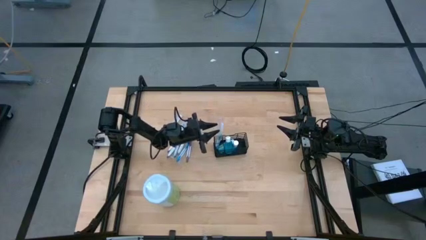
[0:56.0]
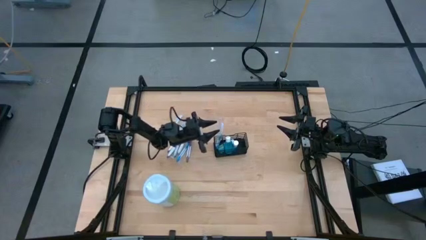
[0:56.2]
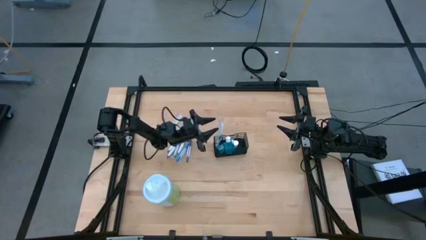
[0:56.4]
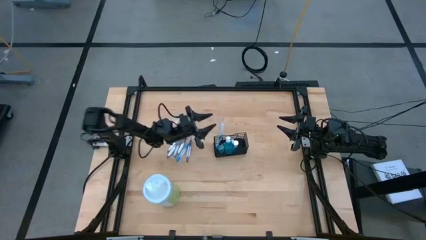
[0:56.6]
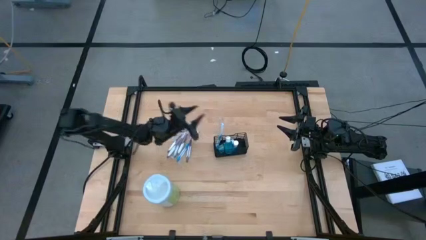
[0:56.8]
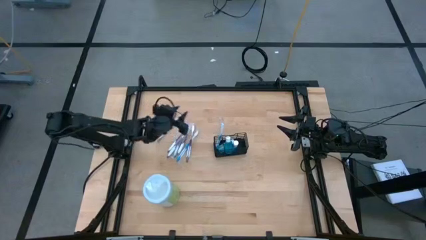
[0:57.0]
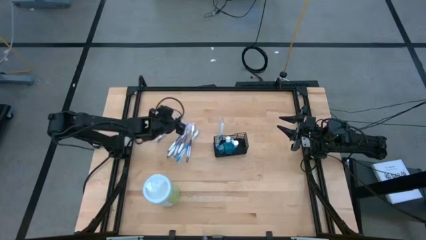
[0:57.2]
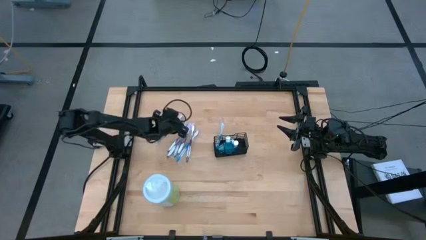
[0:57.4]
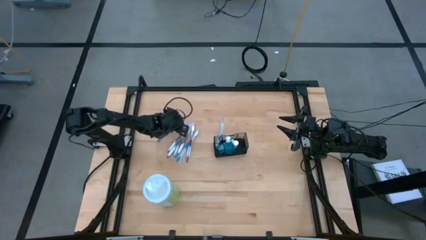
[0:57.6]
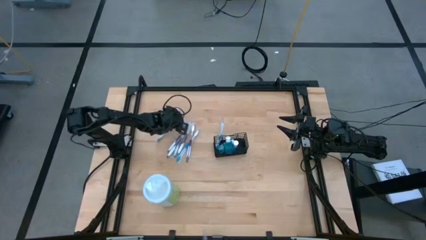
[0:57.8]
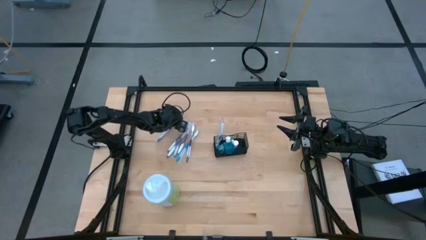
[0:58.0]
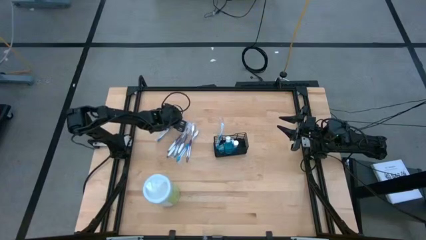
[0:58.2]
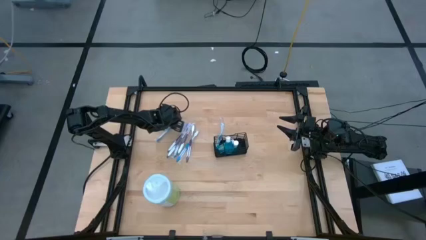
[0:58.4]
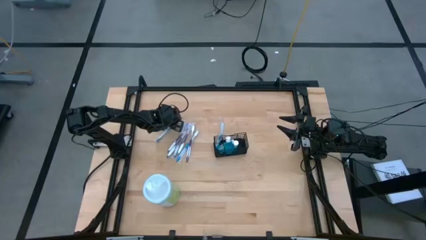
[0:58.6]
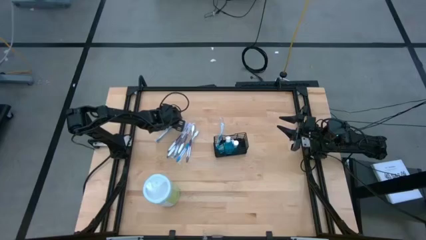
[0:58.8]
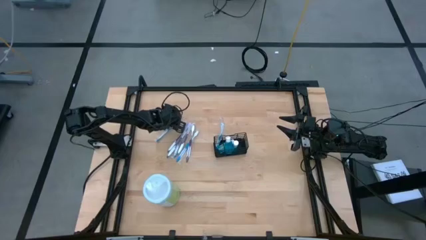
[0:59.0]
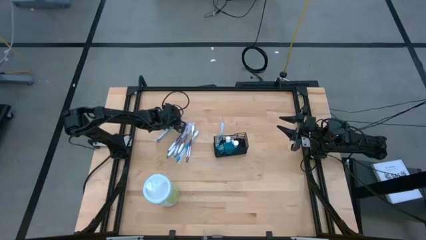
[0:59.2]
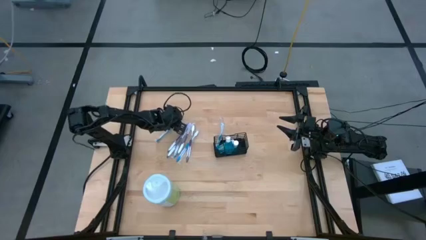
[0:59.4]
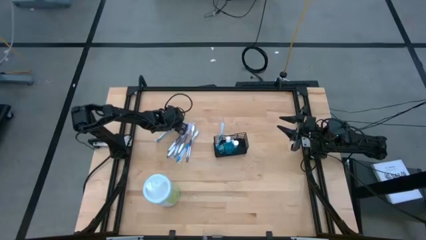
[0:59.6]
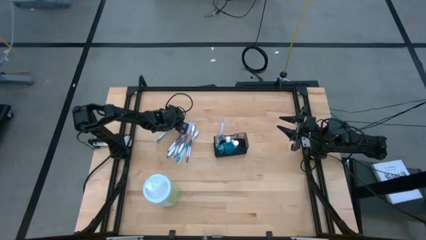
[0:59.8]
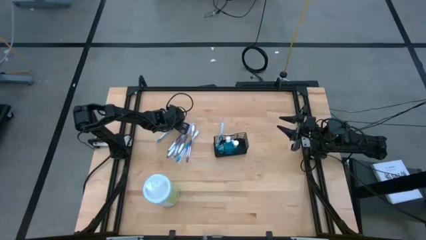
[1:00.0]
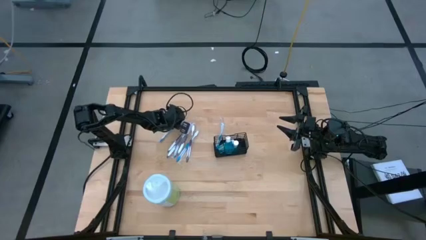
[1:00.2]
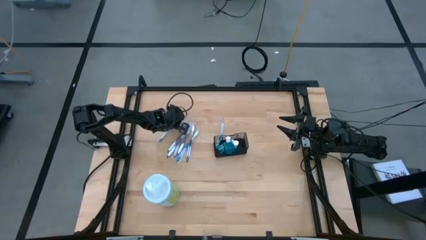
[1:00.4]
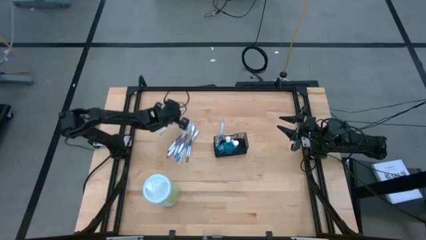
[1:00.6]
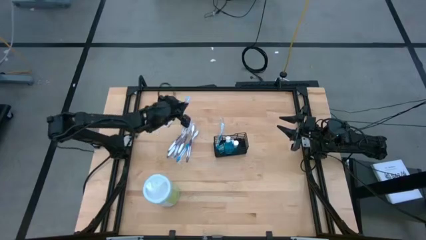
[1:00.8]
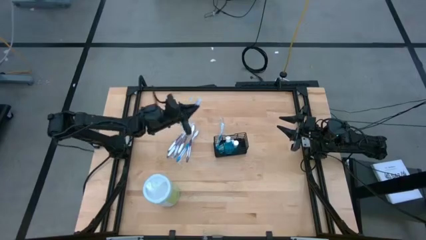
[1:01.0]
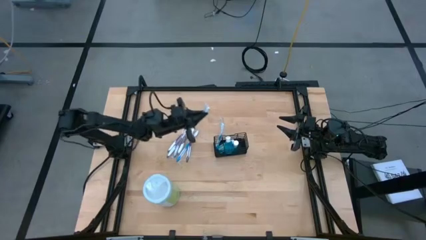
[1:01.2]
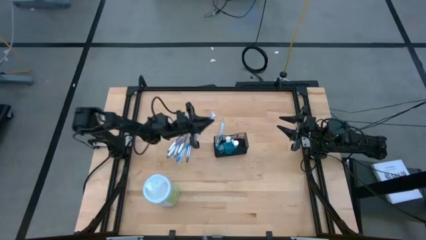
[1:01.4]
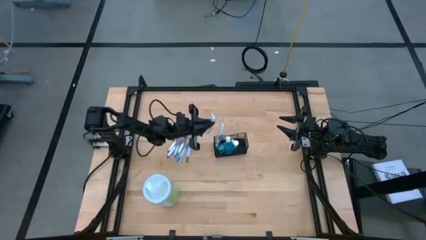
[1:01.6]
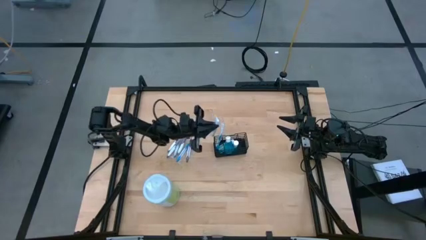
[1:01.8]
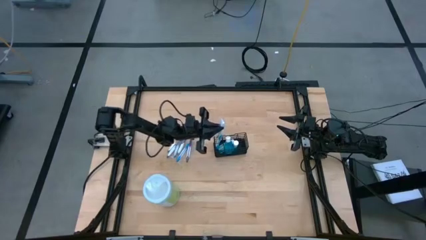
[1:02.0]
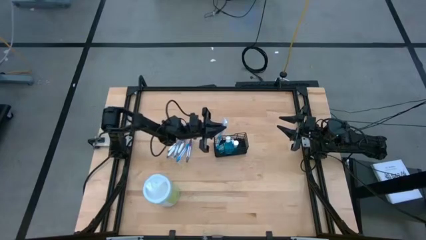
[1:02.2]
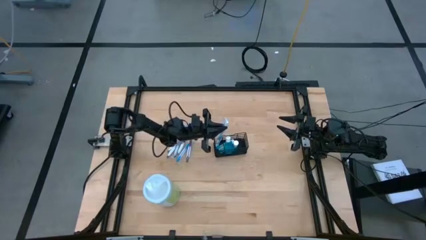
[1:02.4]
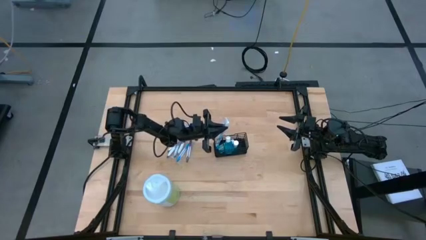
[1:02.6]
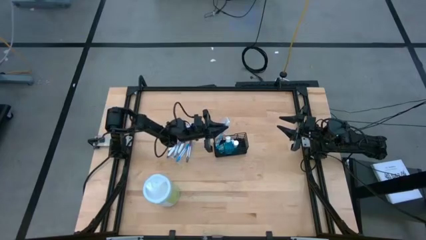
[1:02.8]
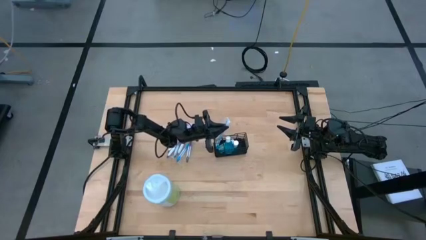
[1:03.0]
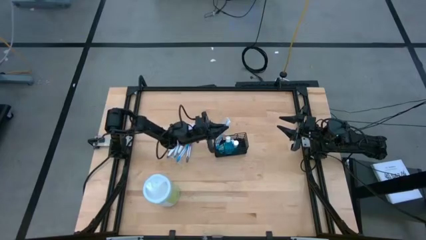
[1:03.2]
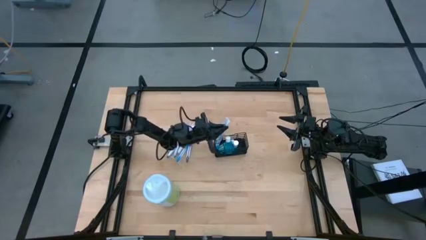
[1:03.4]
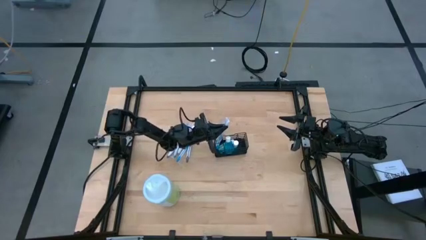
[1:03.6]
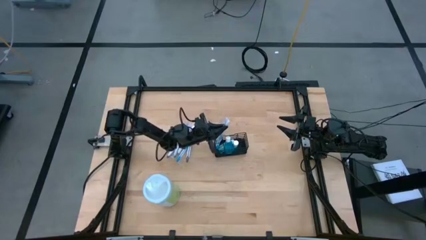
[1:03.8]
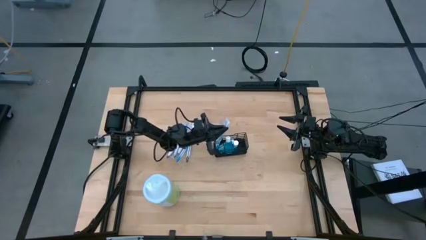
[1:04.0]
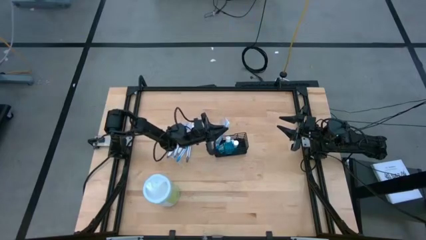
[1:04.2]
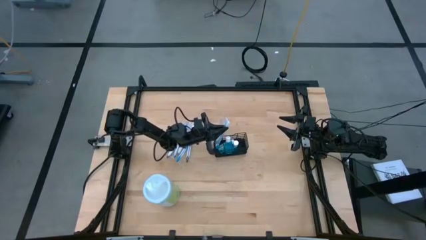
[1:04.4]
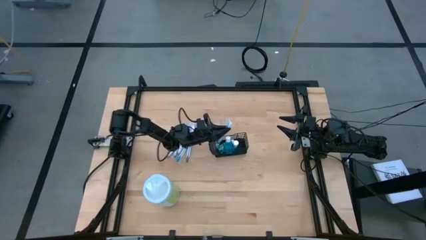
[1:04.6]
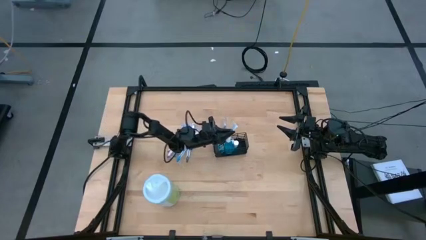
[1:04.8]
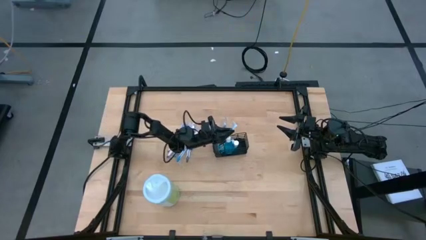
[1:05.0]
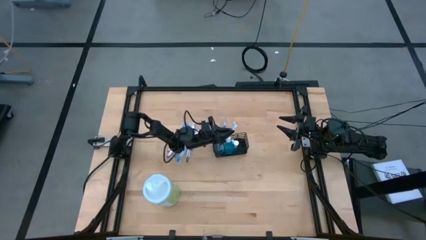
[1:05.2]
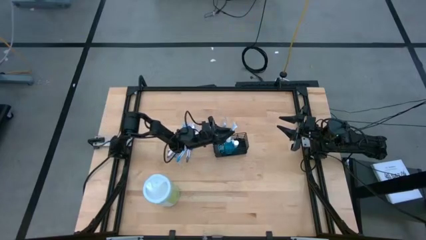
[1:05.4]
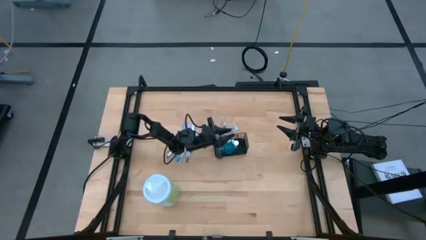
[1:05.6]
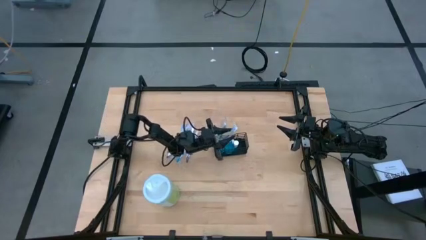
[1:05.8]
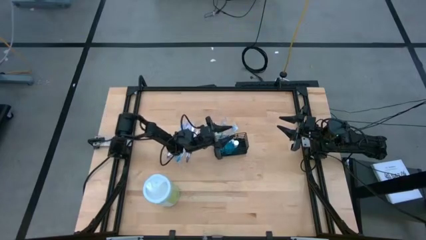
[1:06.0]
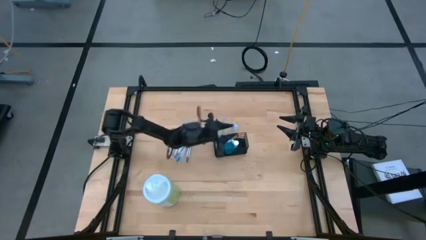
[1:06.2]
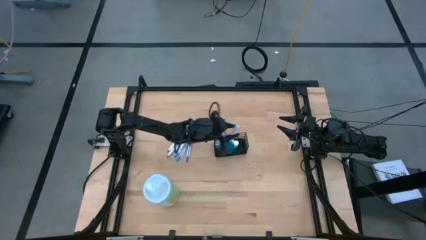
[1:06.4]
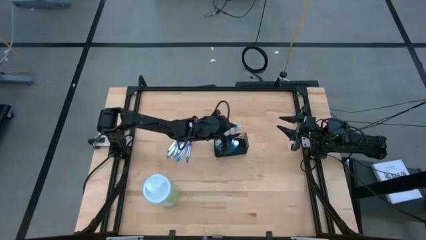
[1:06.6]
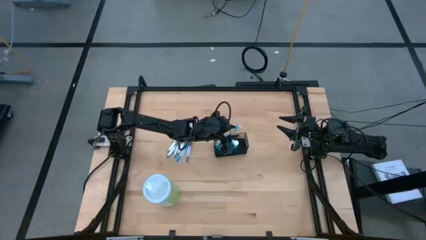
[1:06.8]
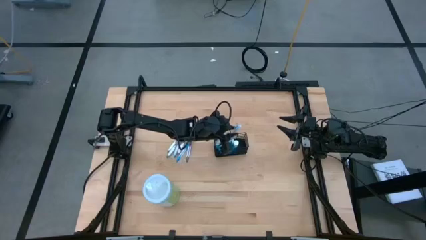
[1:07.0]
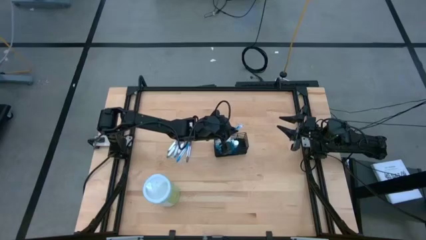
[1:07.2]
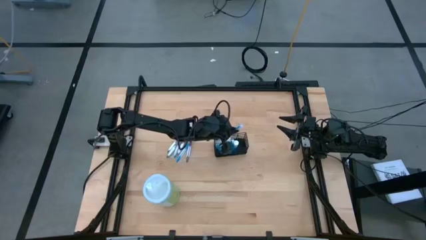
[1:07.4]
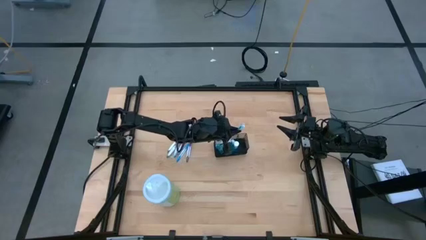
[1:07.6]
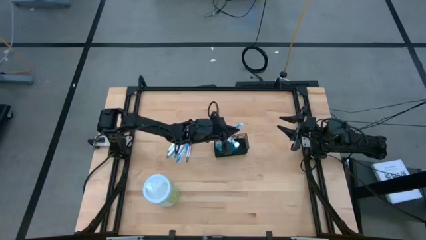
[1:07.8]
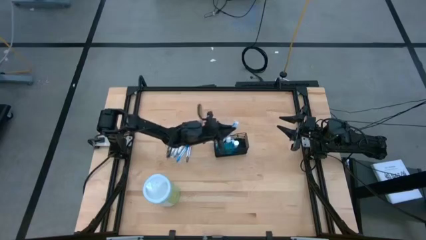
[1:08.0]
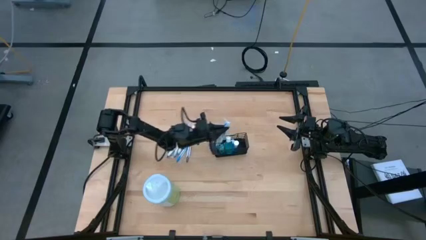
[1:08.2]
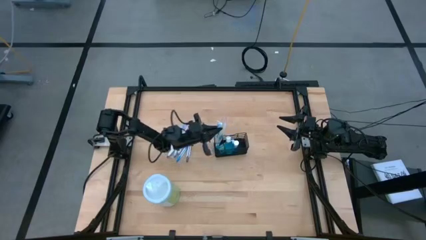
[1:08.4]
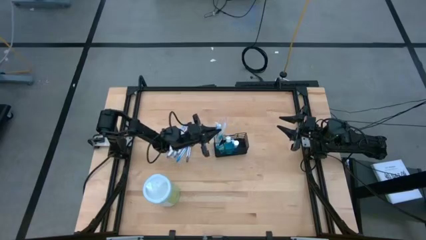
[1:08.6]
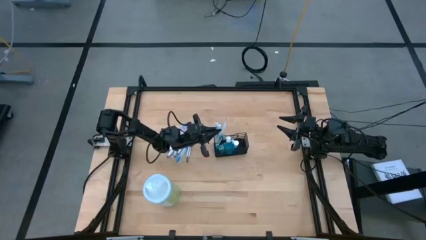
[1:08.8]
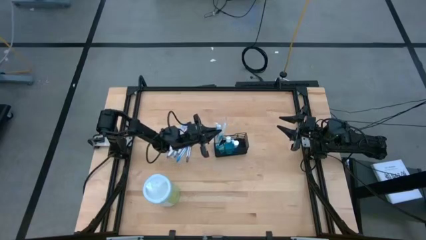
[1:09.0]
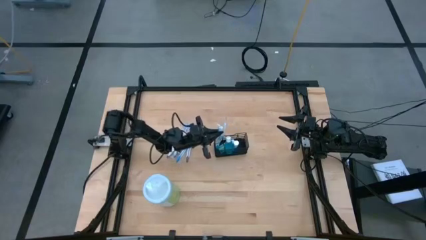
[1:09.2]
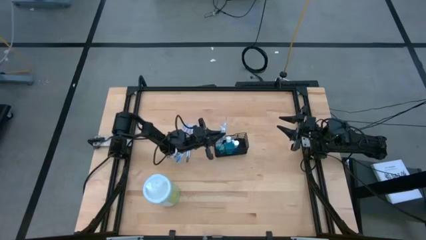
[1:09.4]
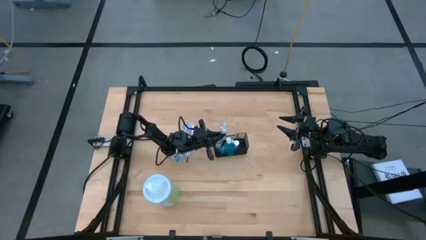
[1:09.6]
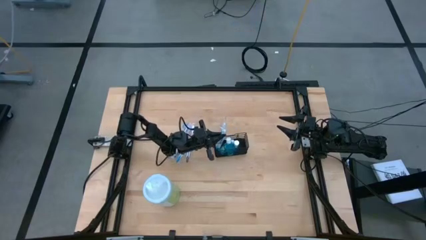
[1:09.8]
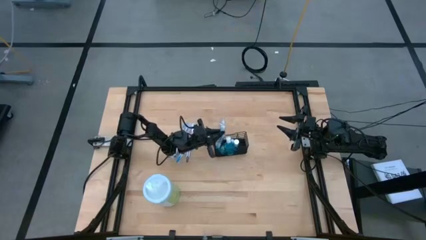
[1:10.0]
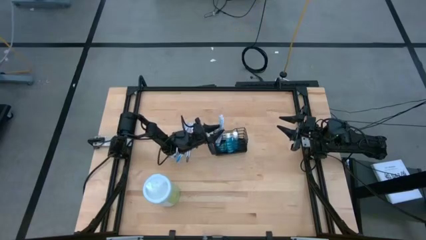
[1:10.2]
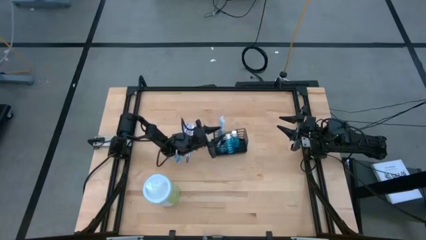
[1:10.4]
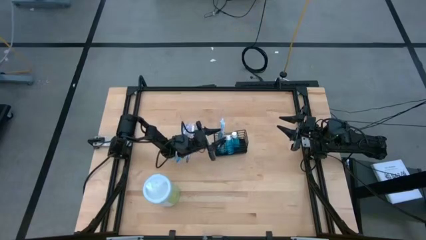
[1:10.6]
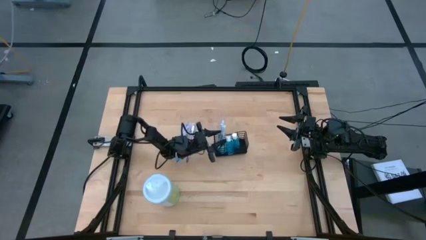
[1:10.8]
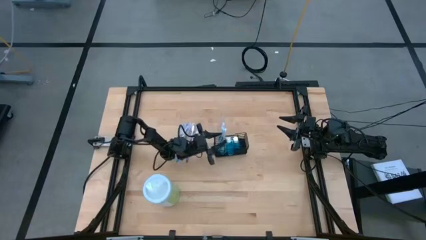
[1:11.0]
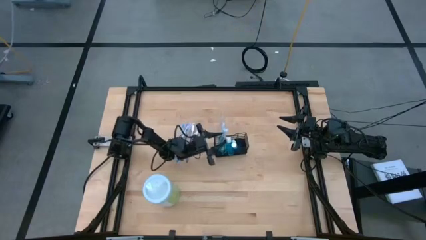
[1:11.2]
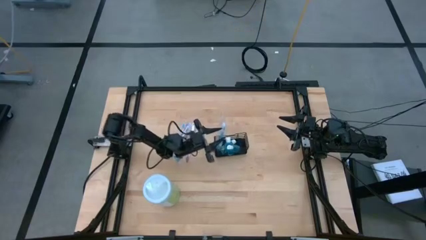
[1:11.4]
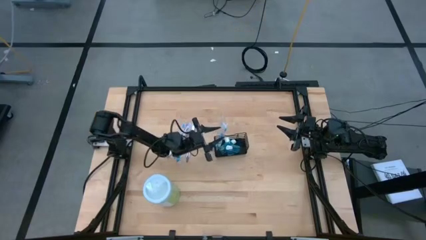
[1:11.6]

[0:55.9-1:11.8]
Task: Pick & Place toothbrushing station
Put the blue toothbrush into the black mesh organizer
